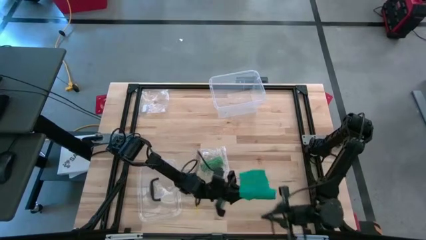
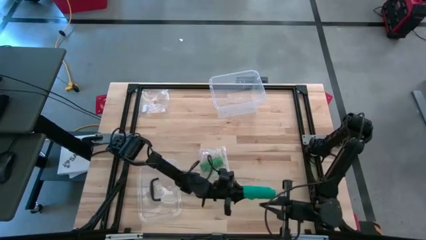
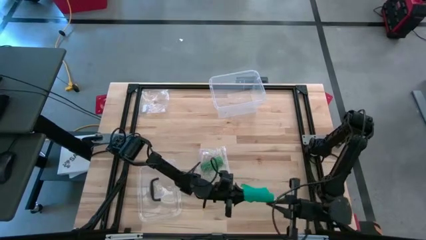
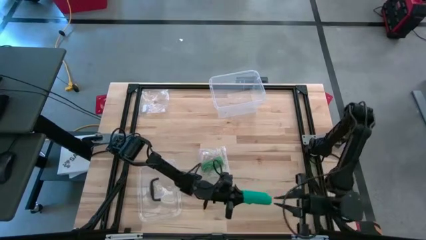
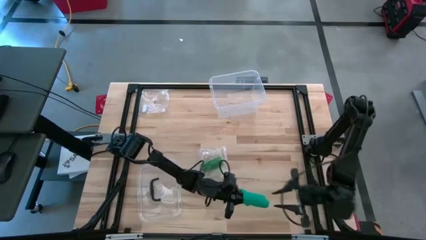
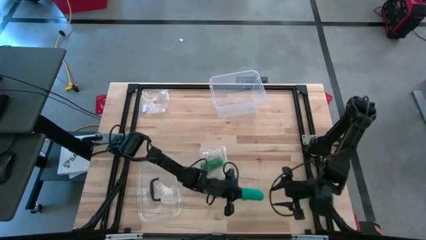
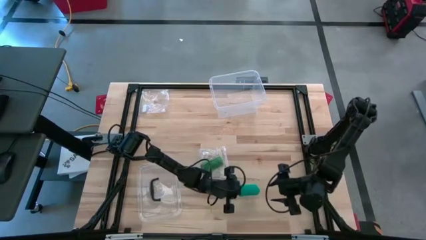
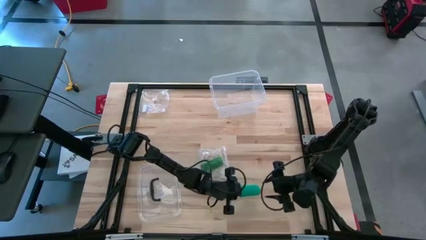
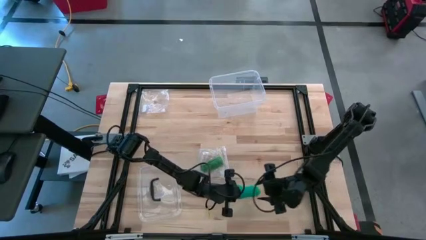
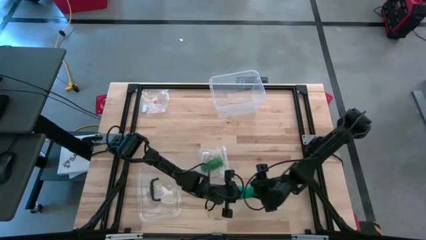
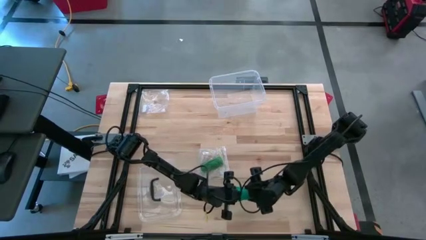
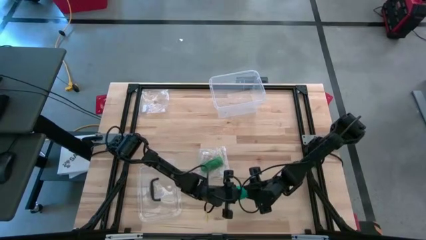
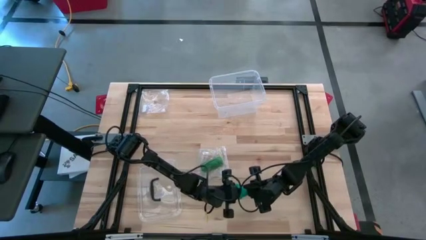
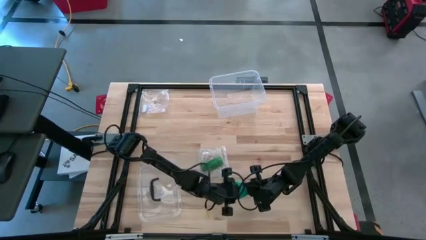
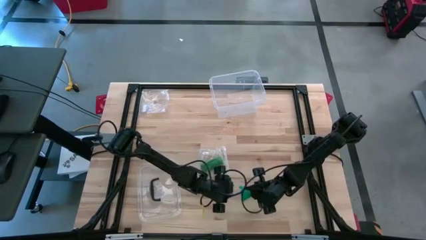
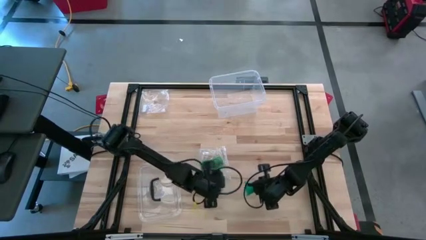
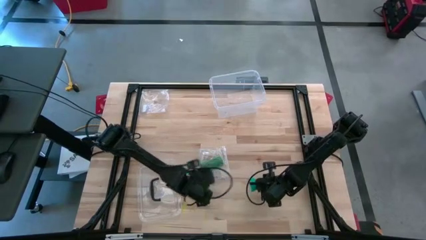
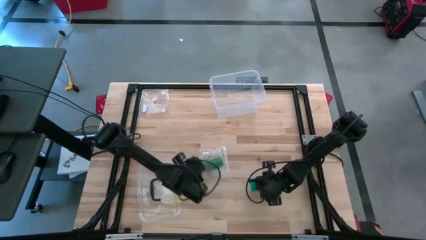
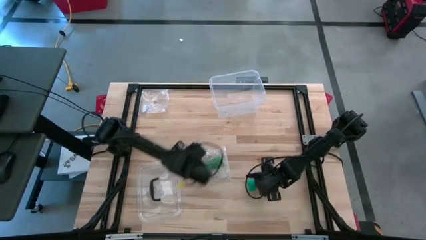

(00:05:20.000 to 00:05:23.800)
Task: Roll bandage
Roll the blue bandage

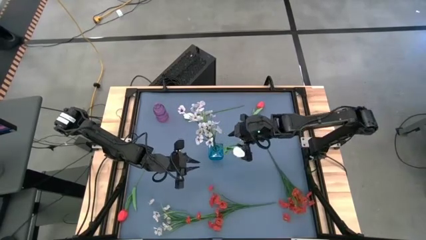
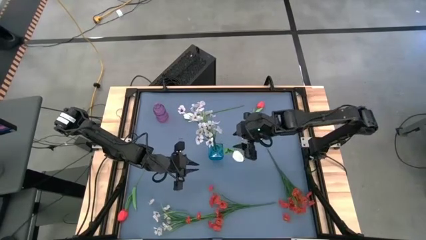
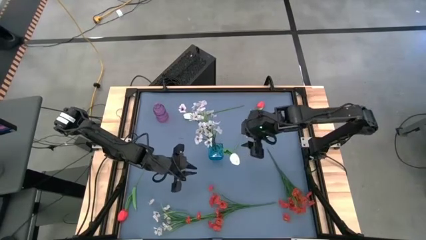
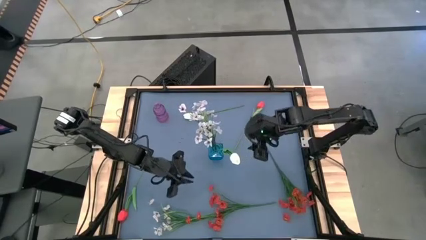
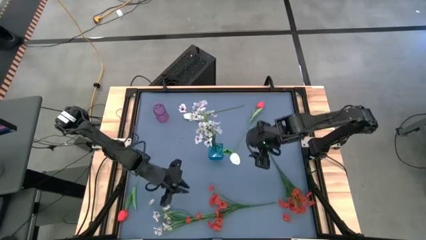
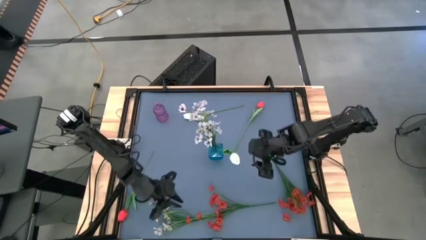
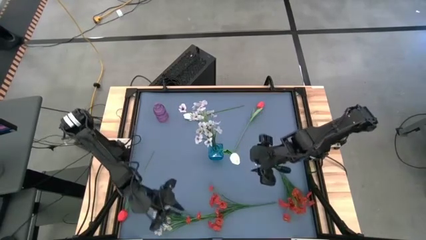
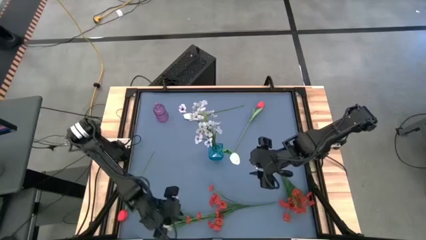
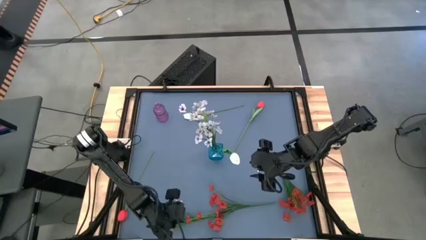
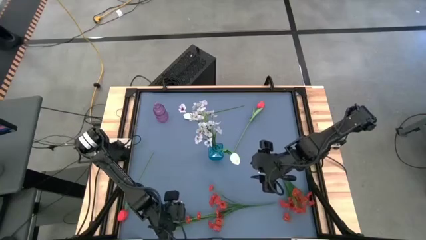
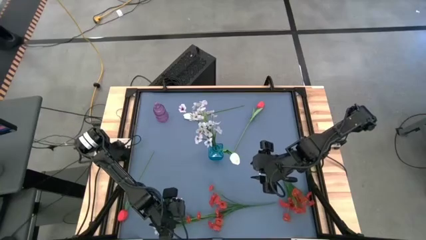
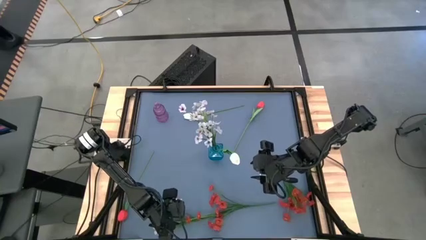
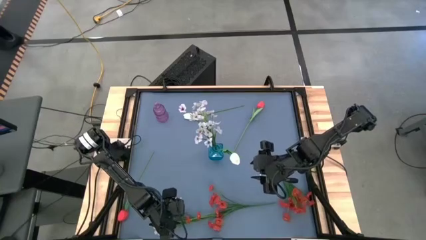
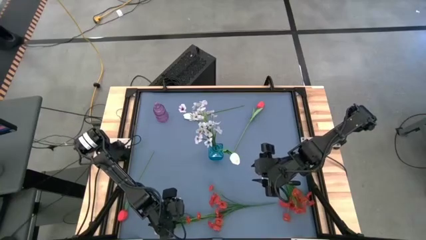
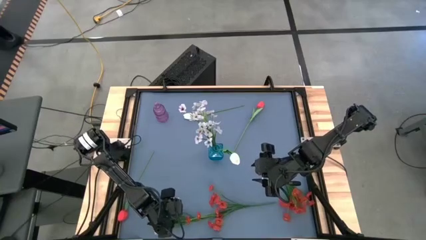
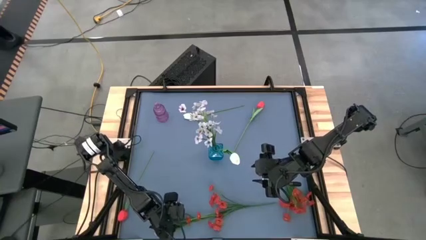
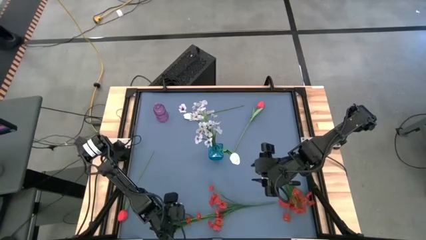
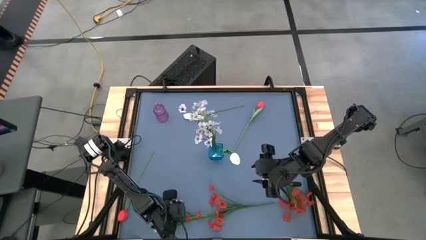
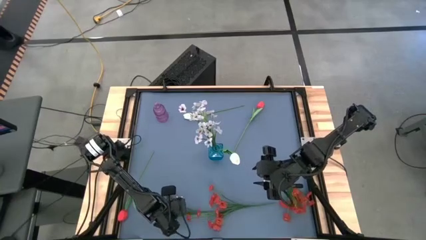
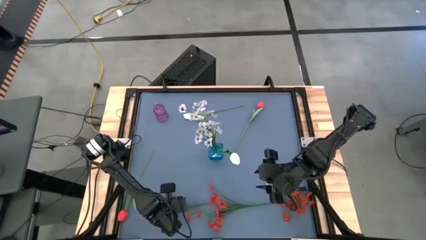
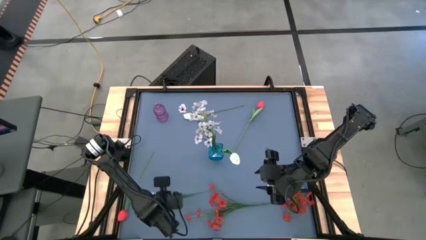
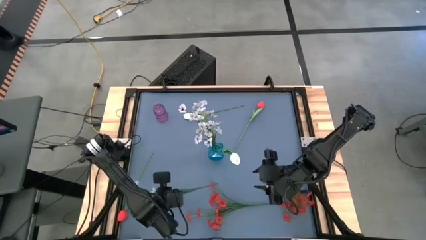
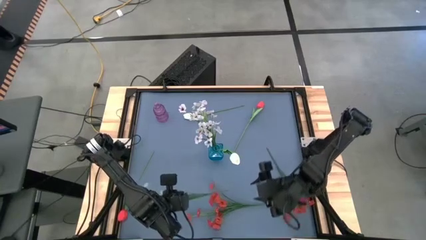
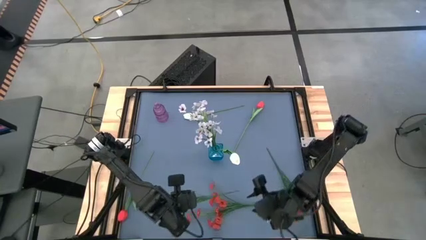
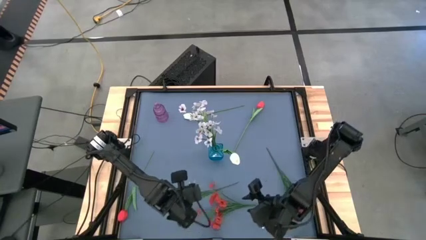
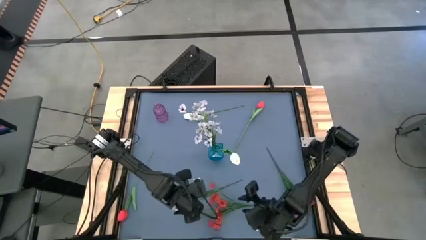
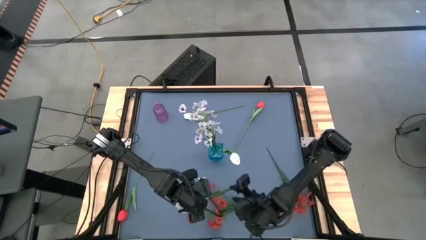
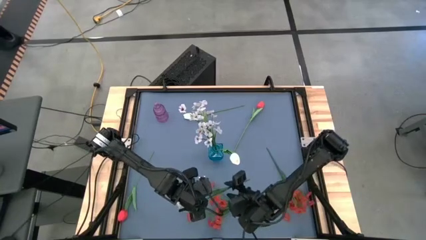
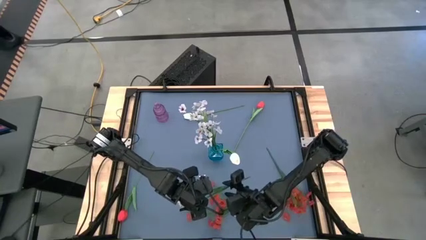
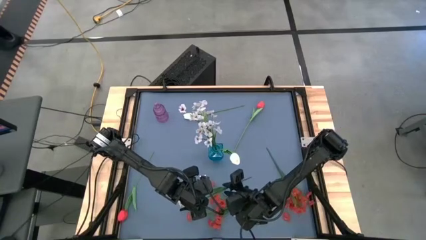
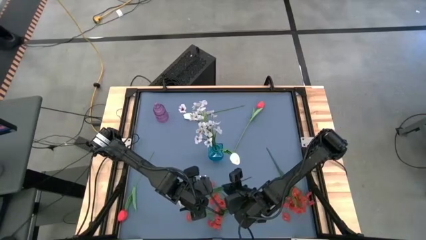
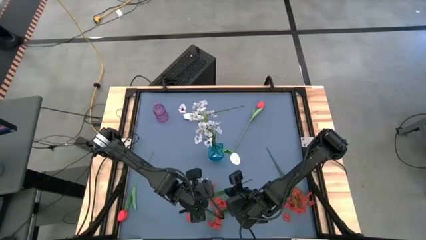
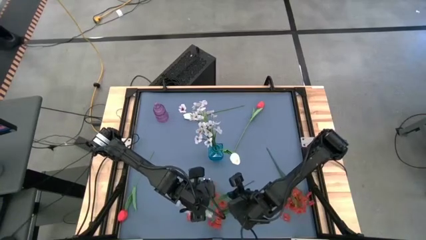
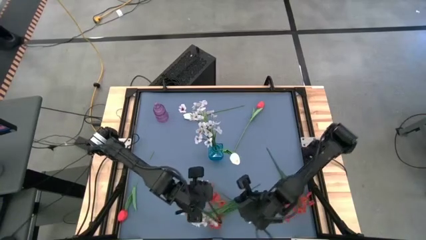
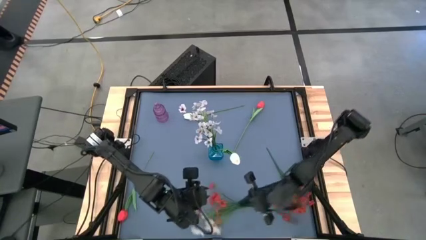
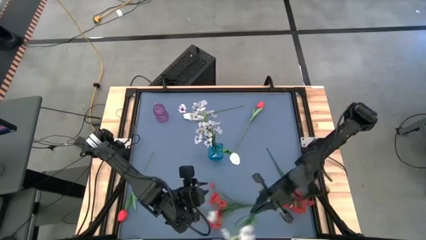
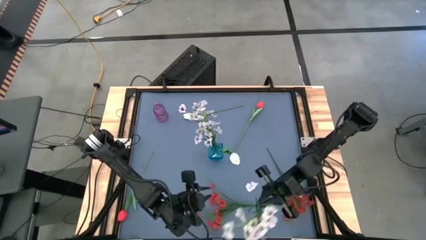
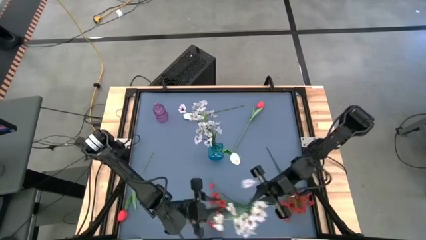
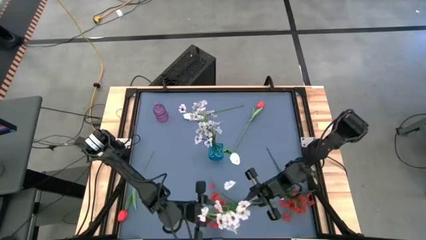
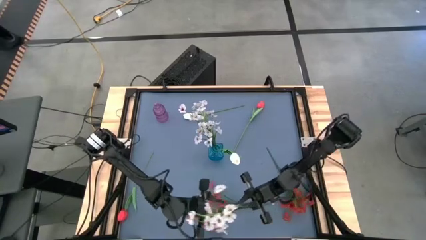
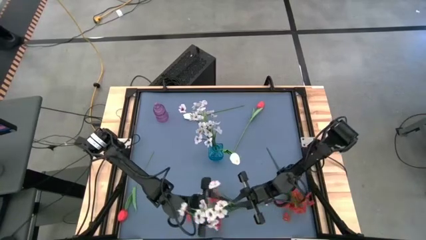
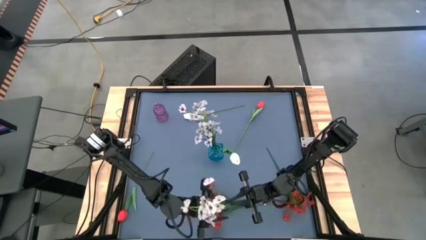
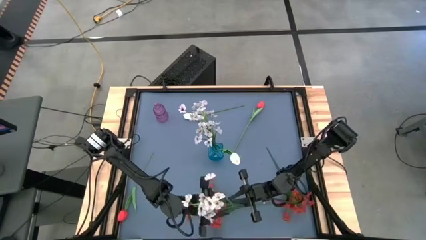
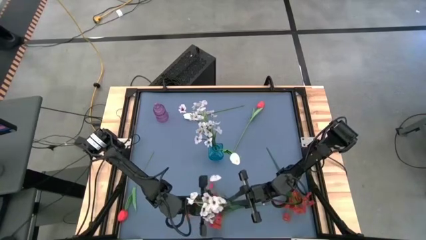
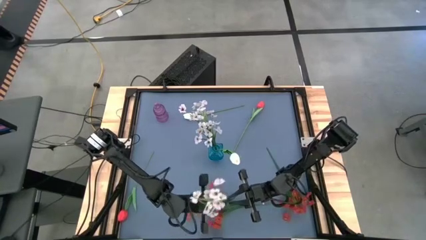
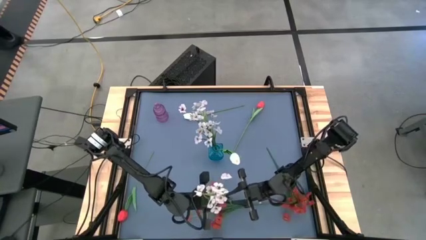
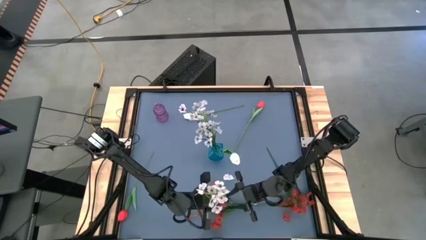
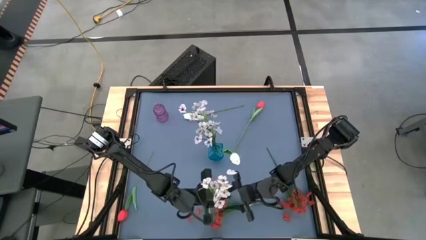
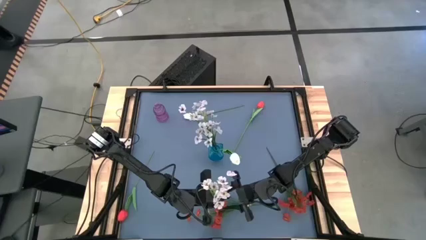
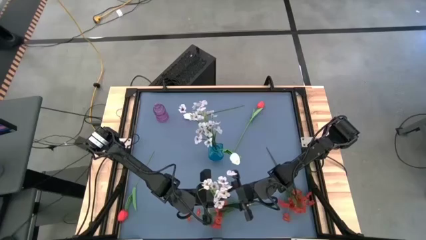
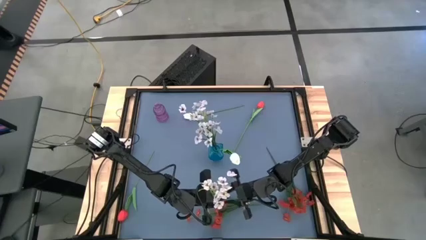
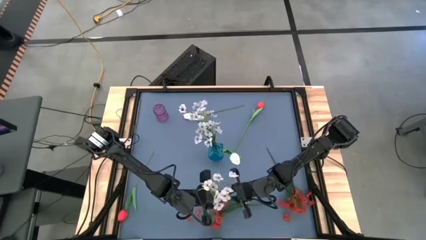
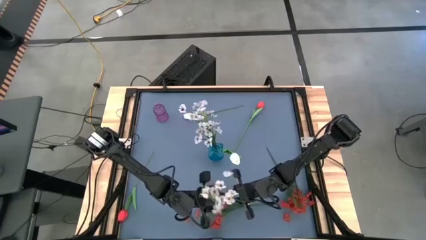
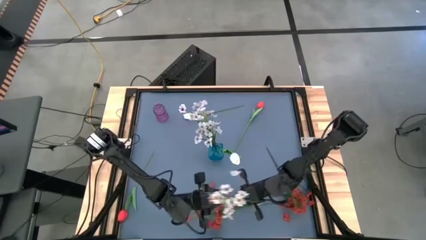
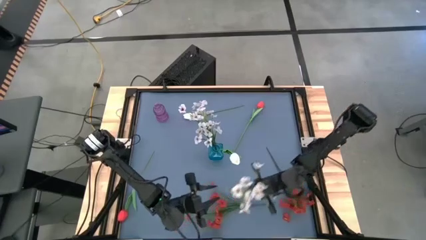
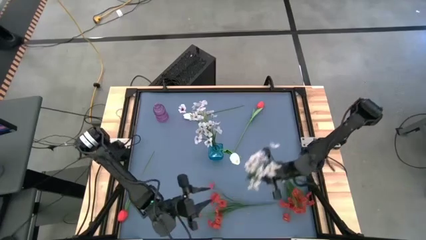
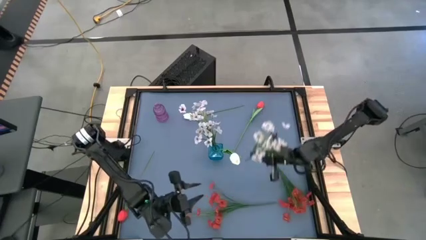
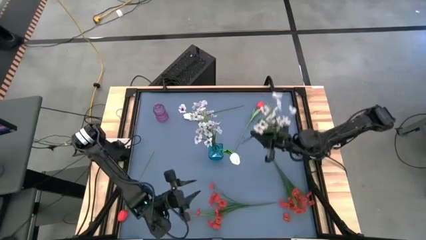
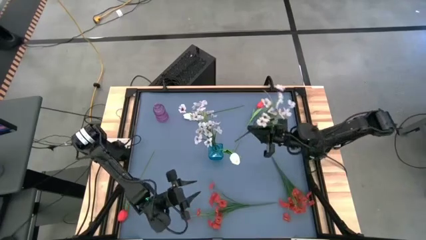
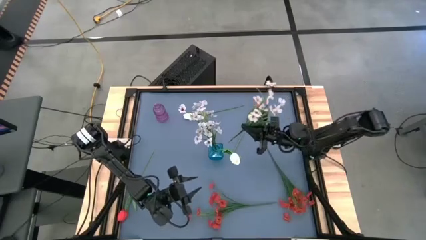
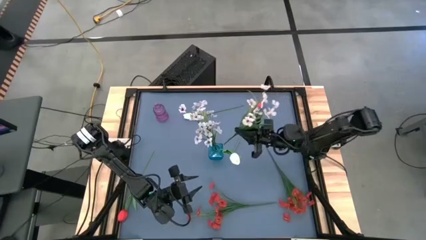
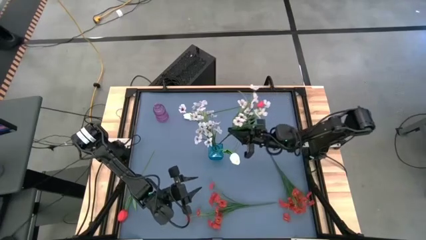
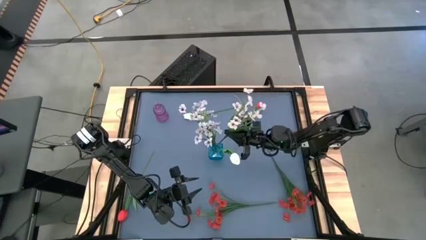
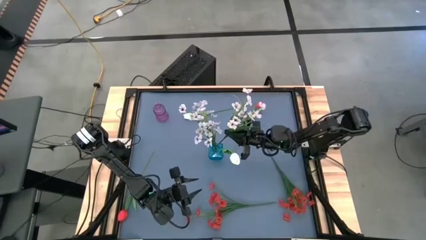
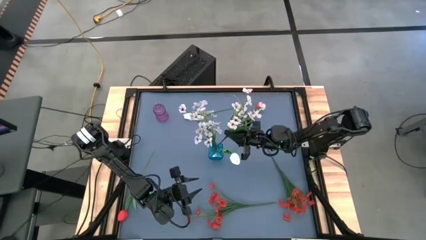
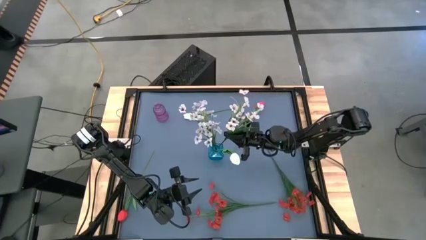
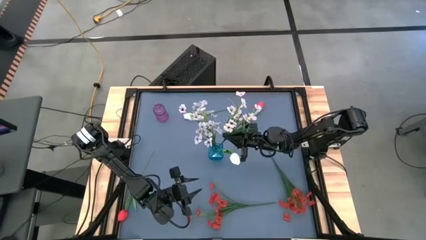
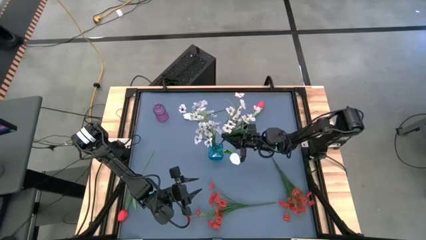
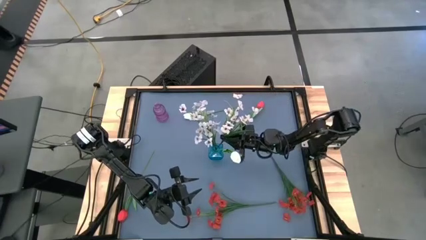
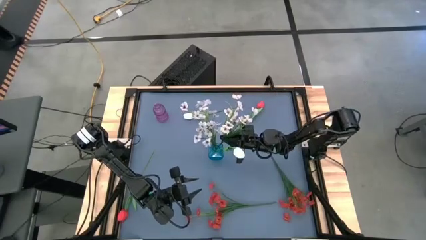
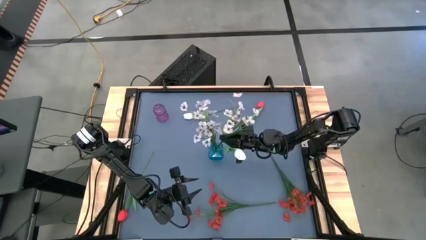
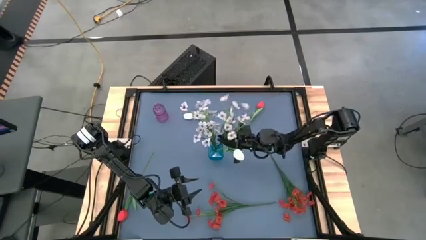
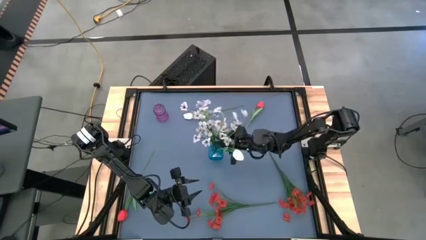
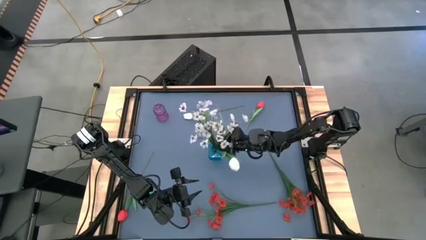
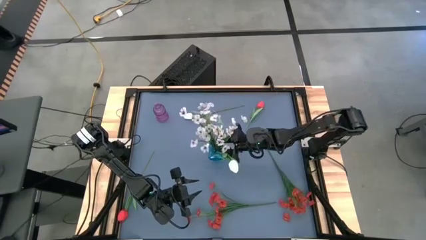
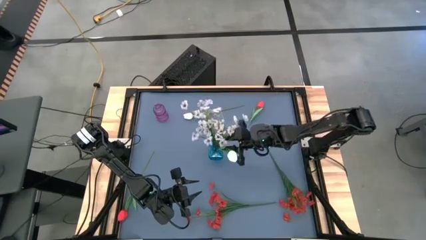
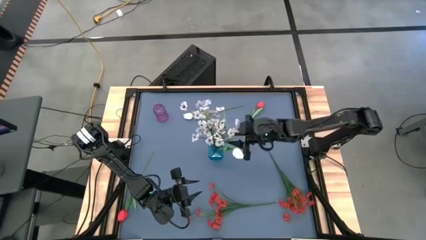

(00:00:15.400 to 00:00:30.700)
Task: Sort flowers into vase by color
Put the white flowers into the blue vase
